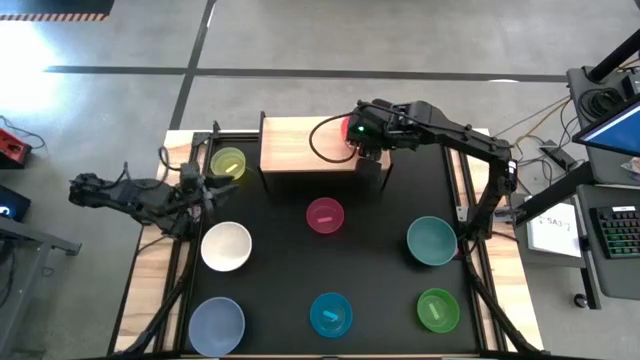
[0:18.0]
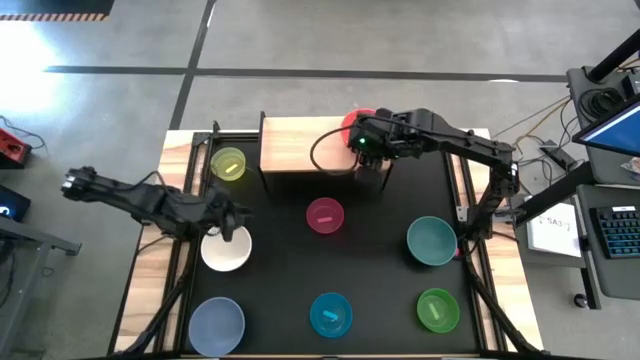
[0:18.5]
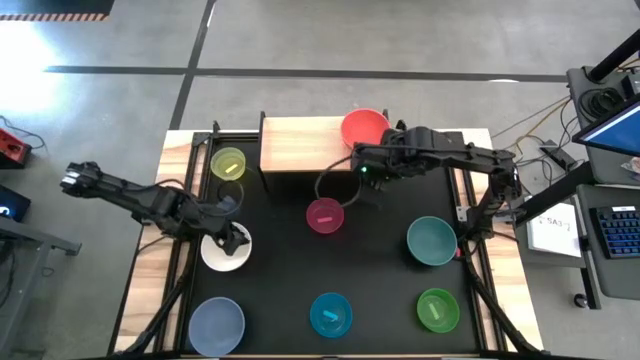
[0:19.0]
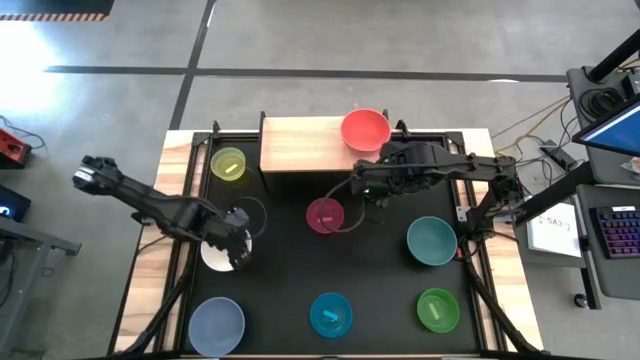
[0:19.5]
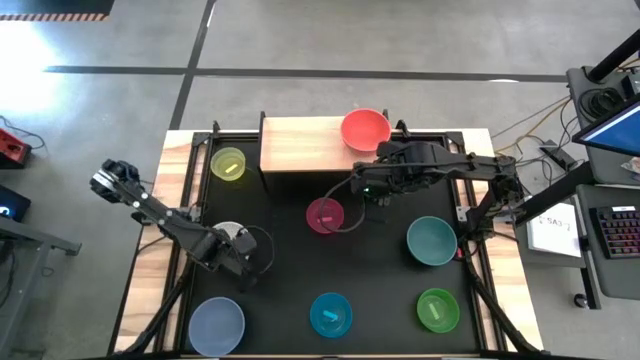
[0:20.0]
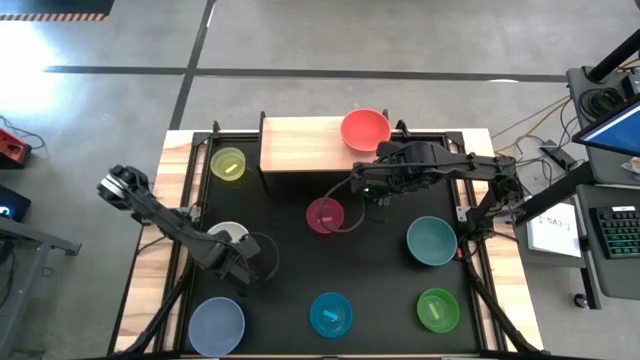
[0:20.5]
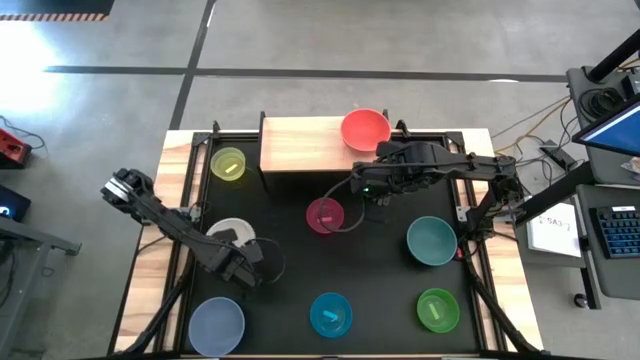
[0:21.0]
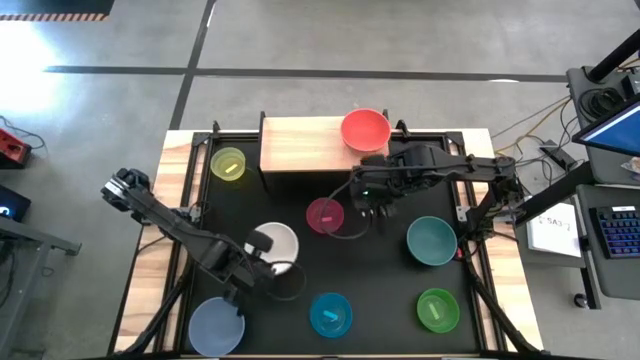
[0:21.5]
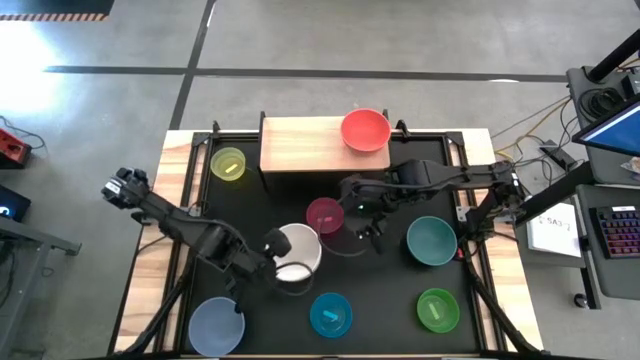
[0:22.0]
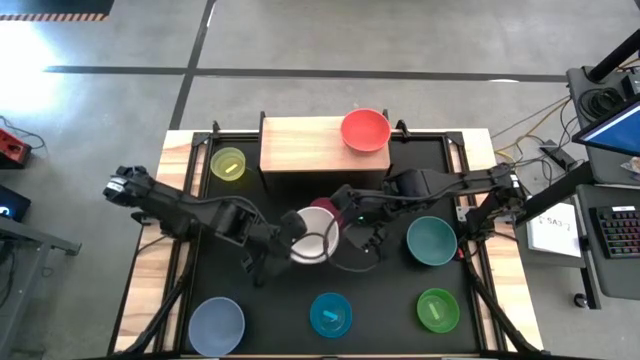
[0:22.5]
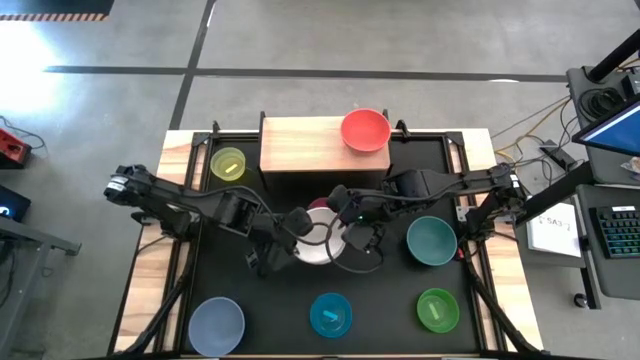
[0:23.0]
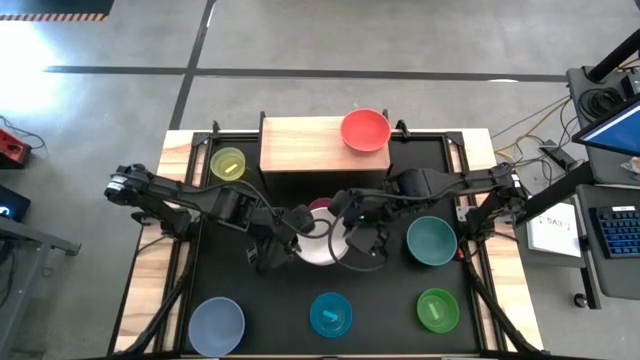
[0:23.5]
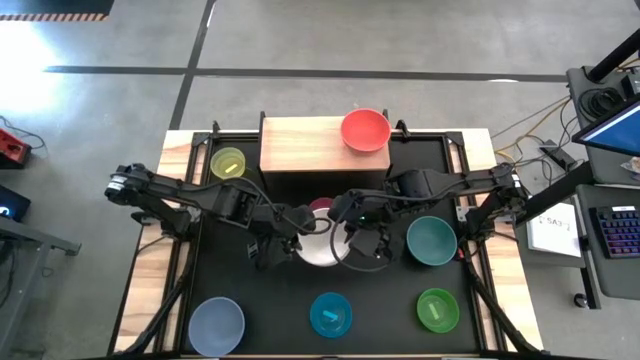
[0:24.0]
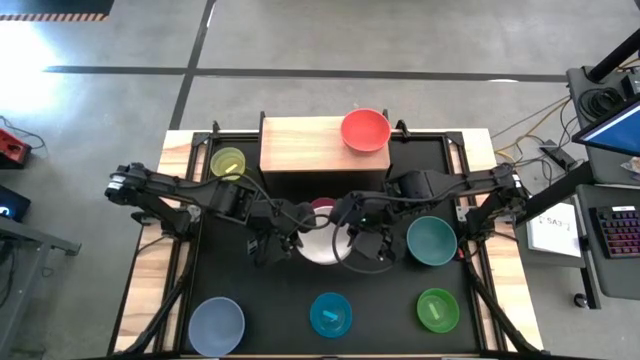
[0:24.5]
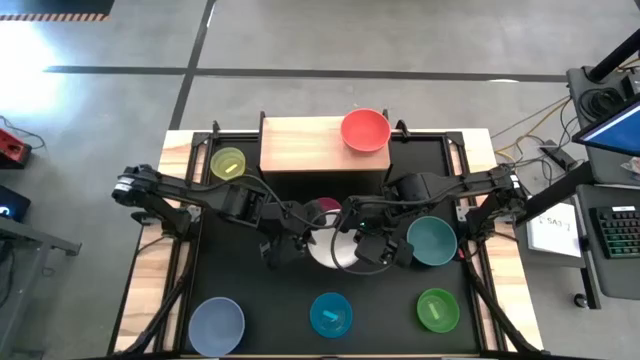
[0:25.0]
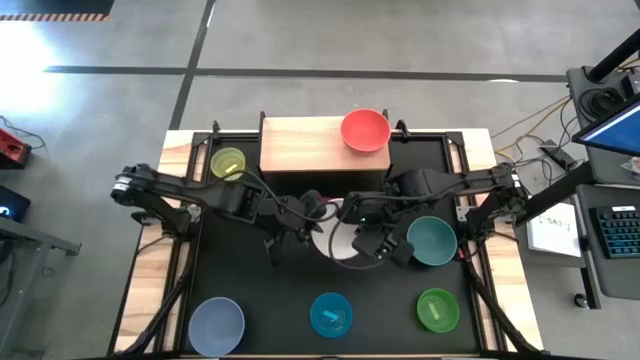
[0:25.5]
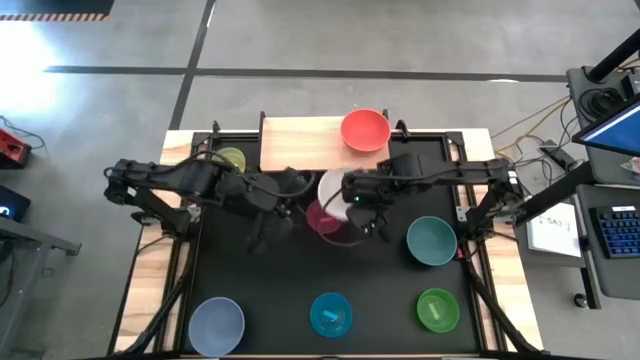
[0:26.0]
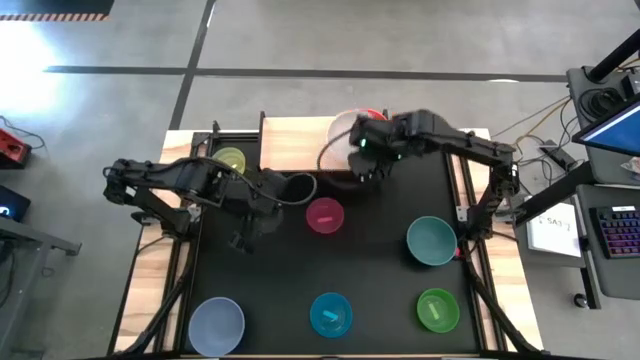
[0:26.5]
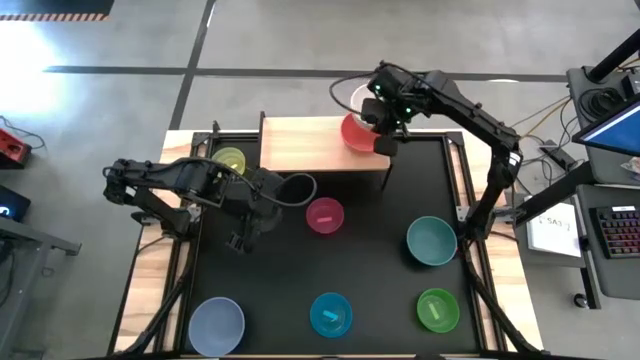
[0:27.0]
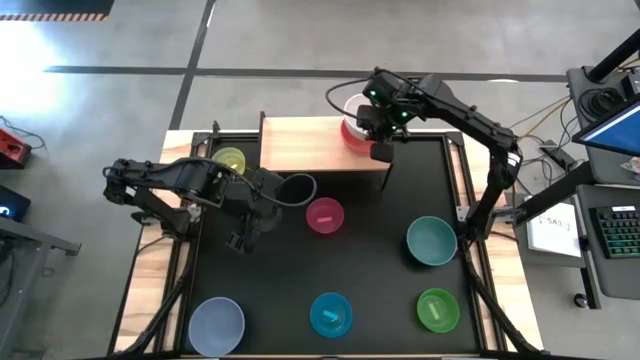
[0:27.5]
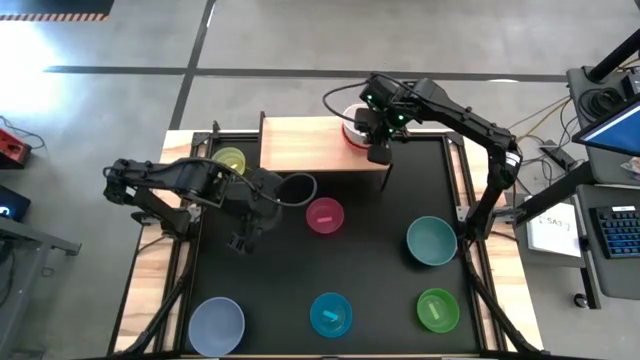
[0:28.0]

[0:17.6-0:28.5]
Task: Place and stack bowls onto a shelf
Stack the white bowl on top of the orange bowl

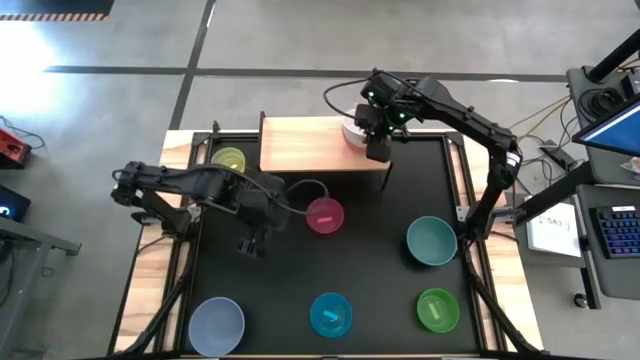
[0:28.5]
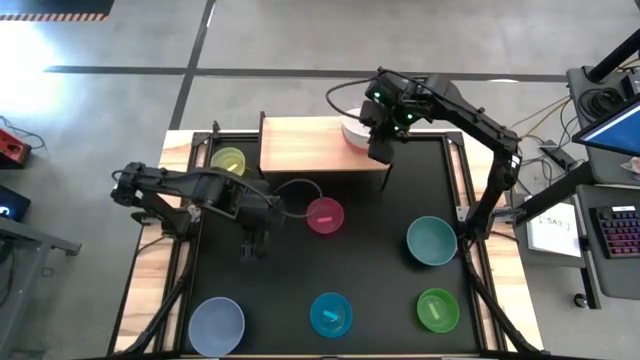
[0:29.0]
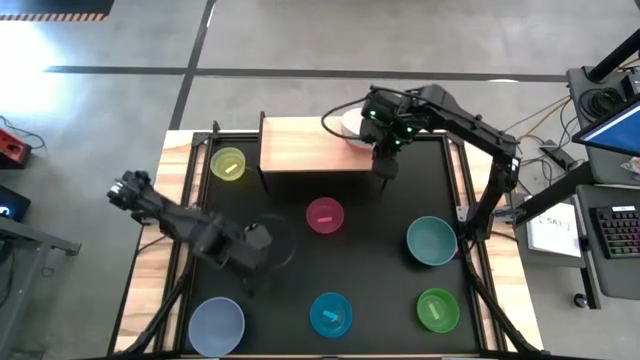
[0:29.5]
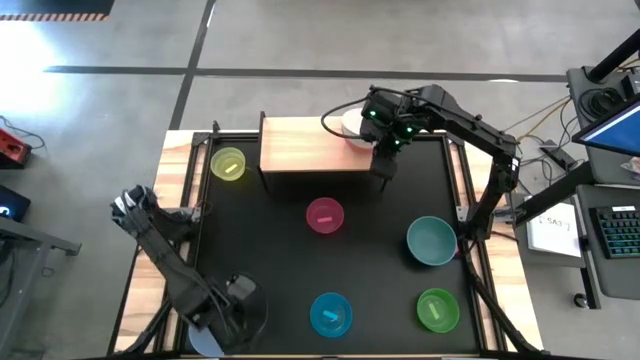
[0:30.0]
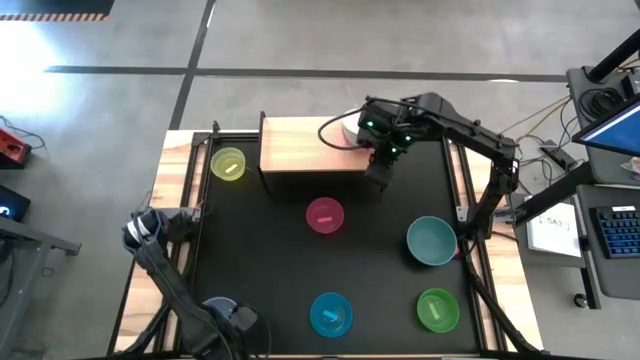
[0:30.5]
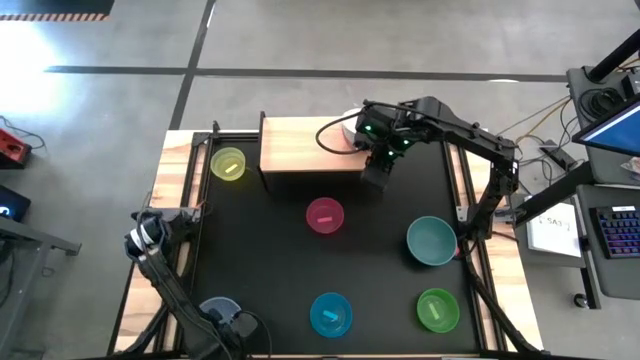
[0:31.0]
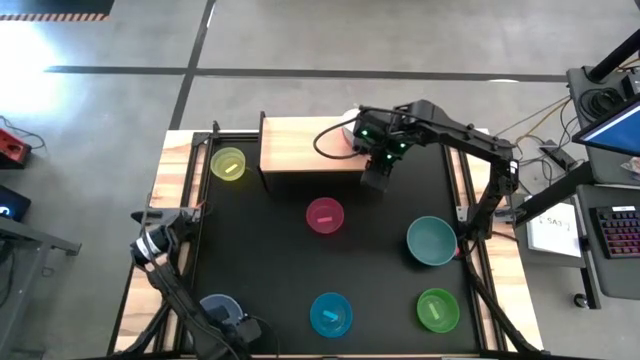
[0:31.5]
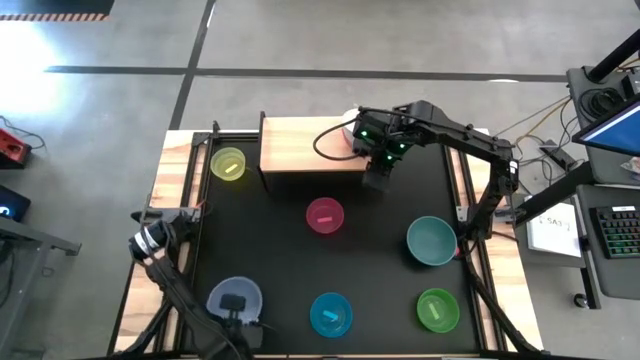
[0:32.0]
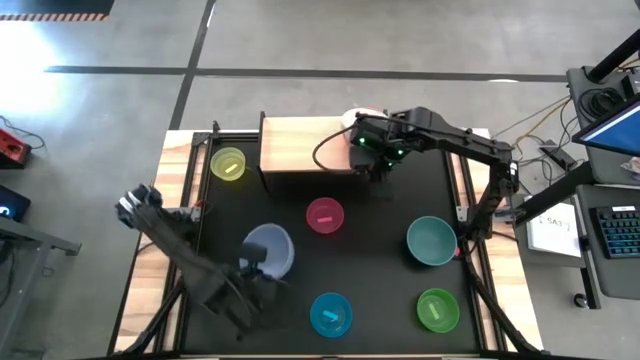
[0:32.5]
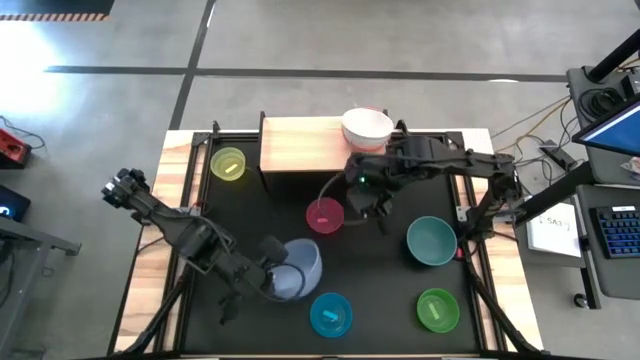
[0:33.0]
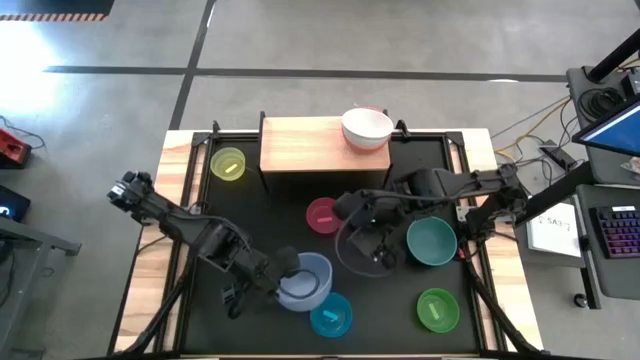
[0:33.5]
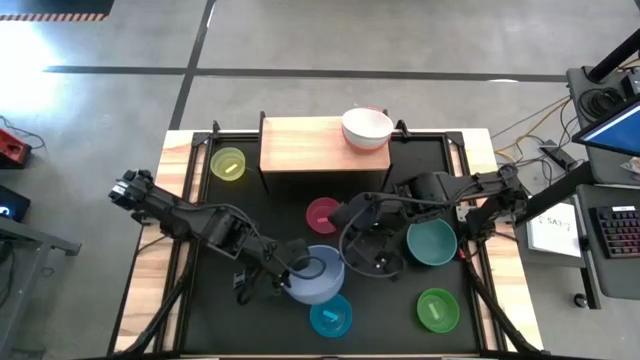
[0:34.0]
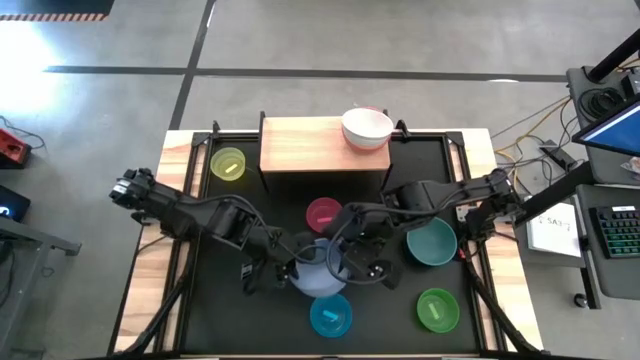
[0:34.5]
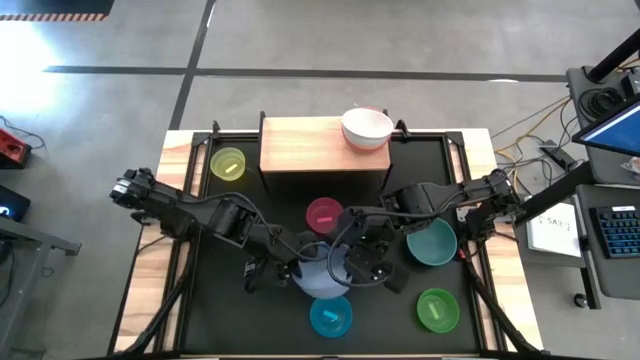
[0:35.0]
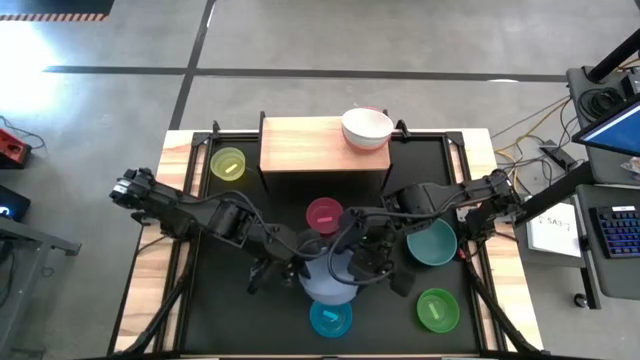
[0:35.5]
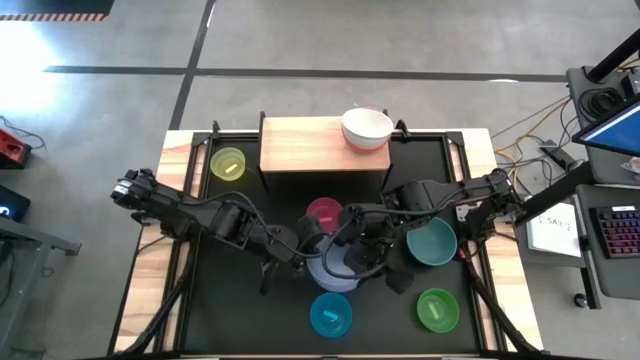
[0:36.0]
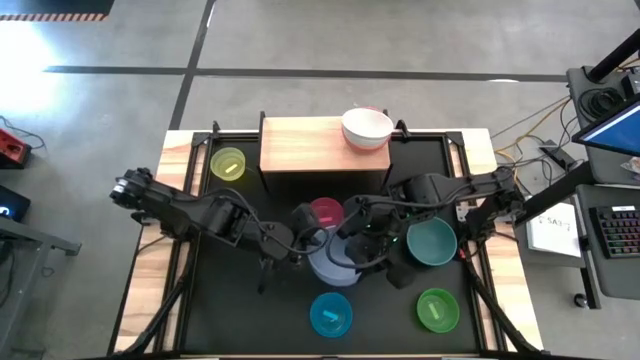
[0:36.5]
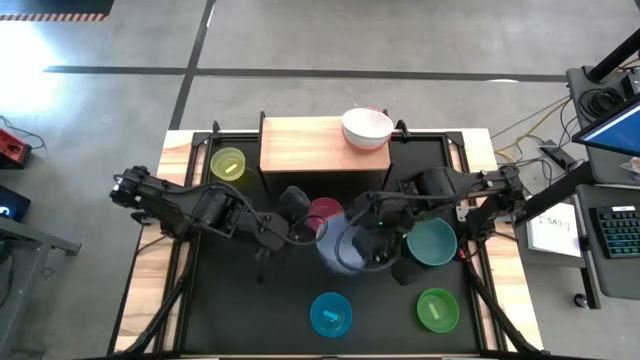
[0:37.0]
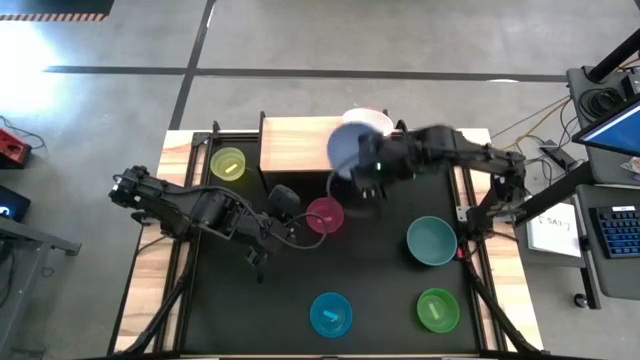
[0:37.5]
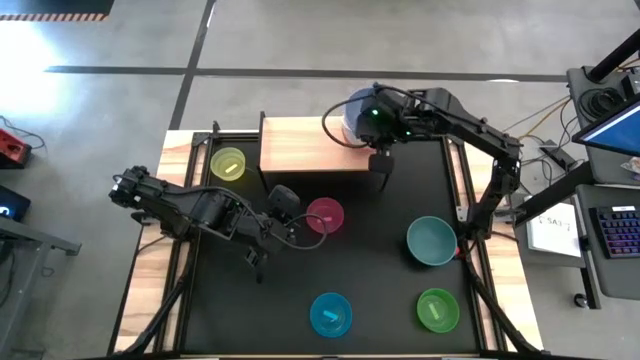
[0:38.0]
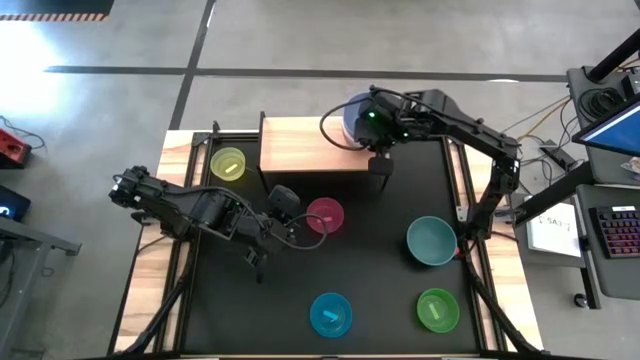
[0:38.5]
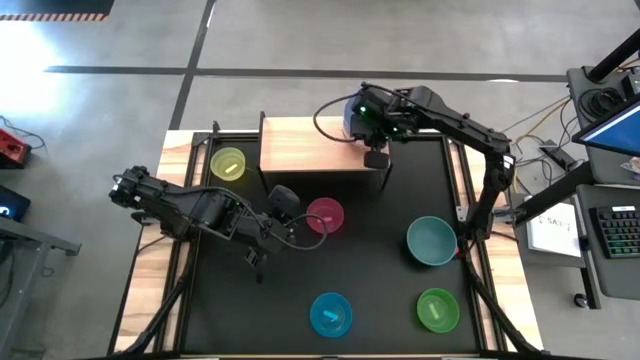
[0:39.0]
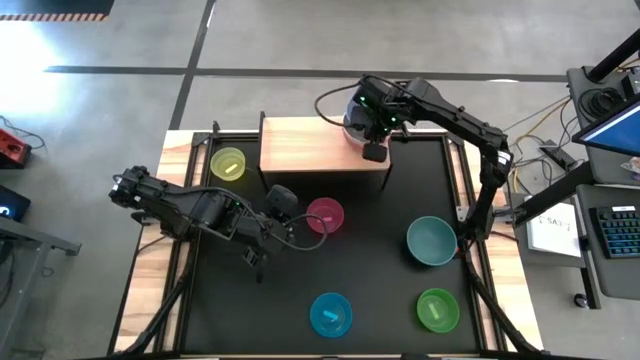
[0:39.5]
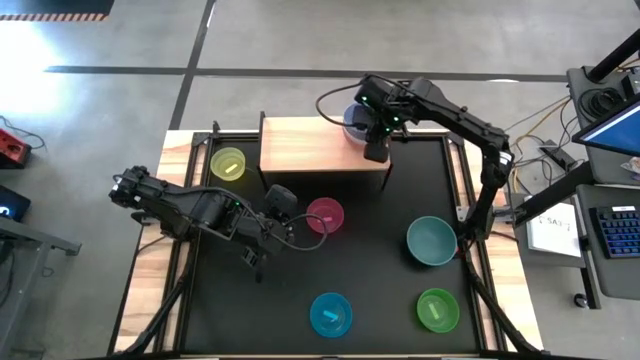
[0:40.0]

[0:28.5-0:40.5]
Stack the purple bowl on top of the white bowl
